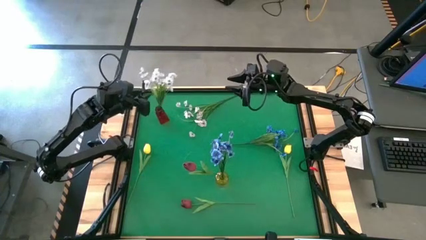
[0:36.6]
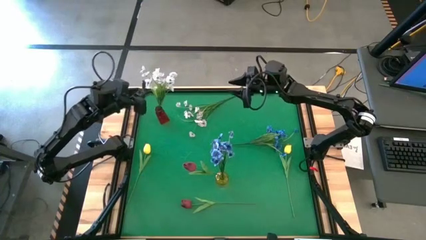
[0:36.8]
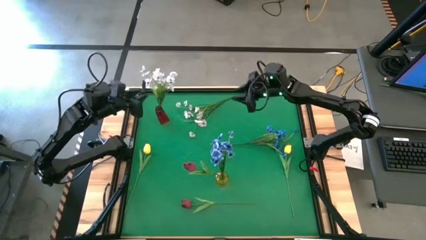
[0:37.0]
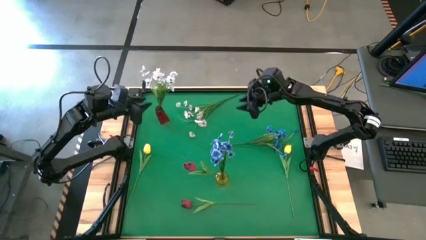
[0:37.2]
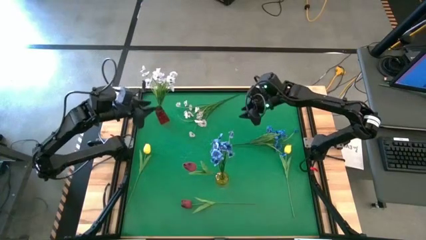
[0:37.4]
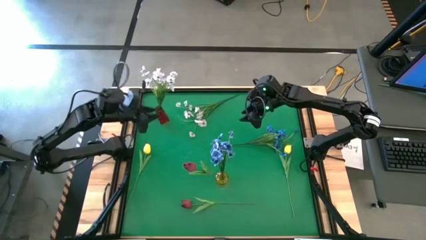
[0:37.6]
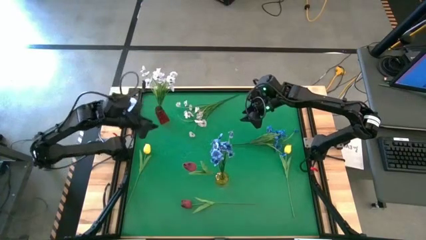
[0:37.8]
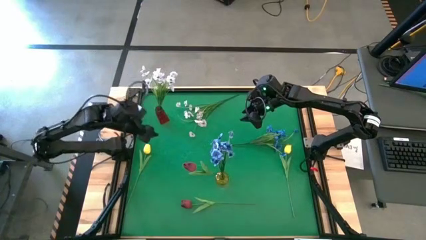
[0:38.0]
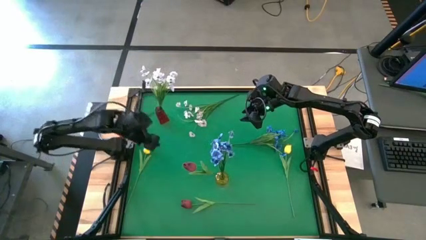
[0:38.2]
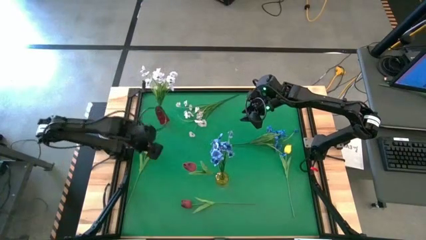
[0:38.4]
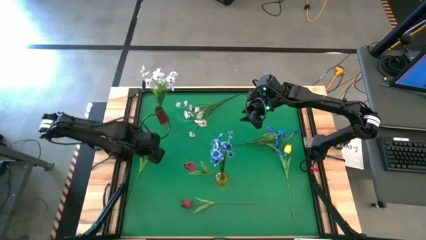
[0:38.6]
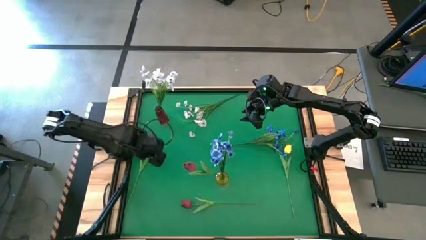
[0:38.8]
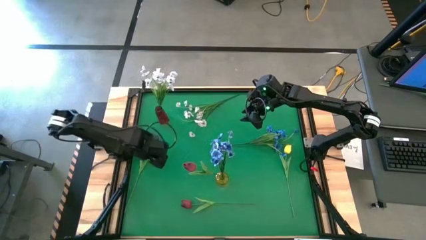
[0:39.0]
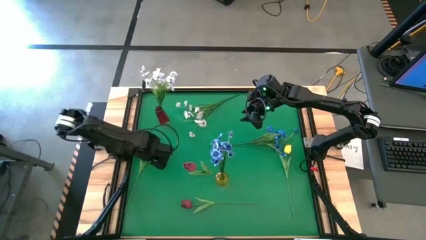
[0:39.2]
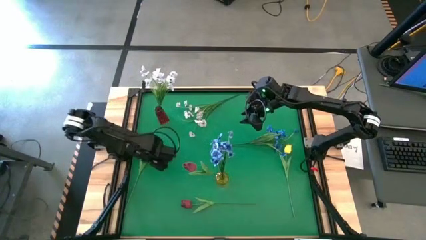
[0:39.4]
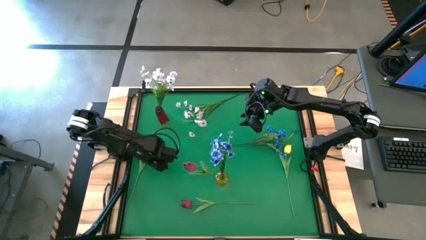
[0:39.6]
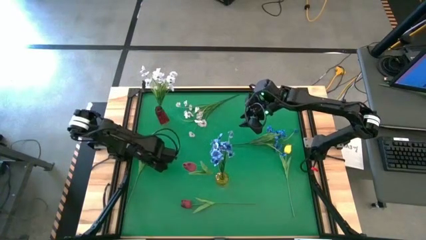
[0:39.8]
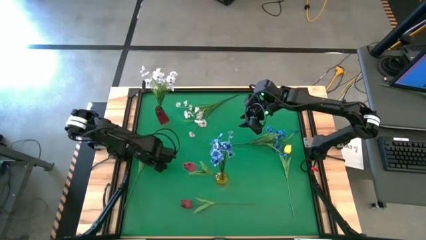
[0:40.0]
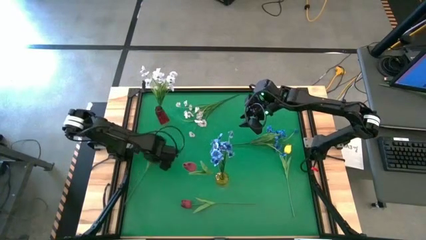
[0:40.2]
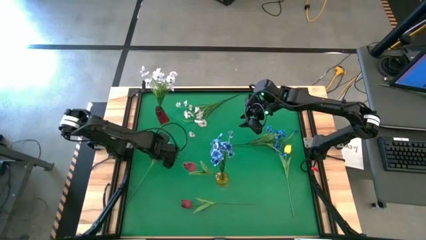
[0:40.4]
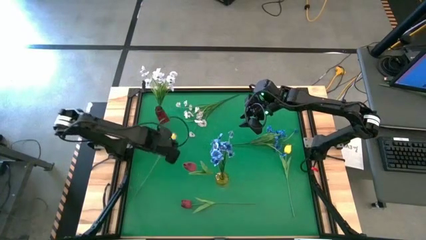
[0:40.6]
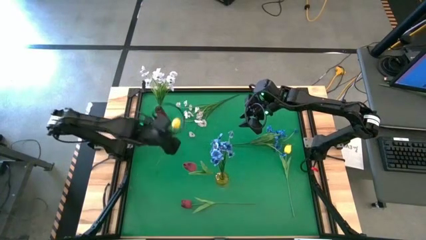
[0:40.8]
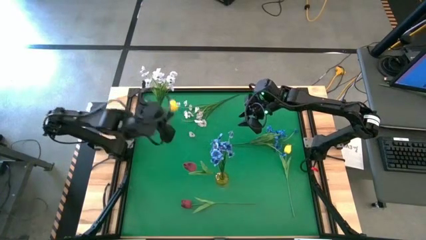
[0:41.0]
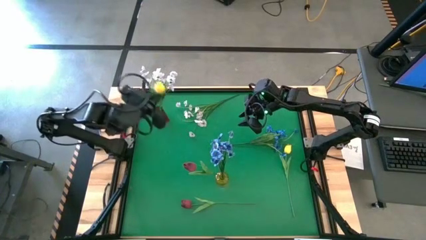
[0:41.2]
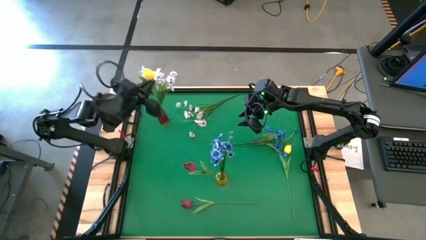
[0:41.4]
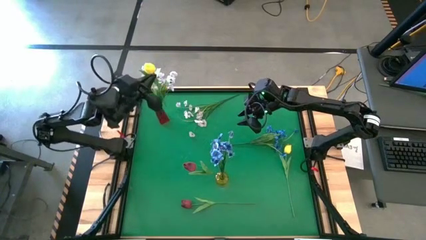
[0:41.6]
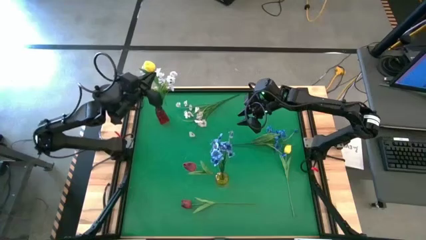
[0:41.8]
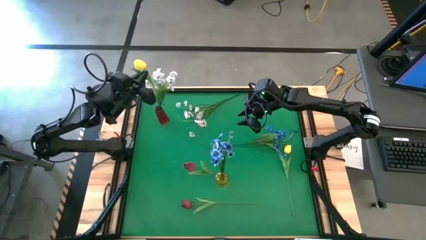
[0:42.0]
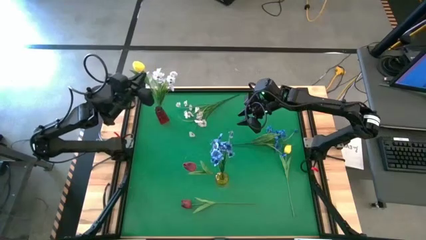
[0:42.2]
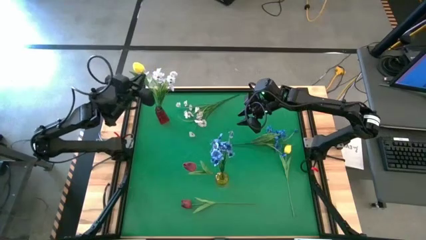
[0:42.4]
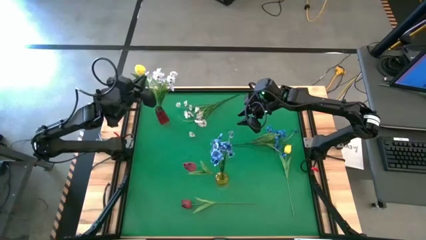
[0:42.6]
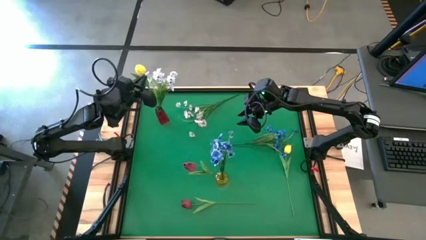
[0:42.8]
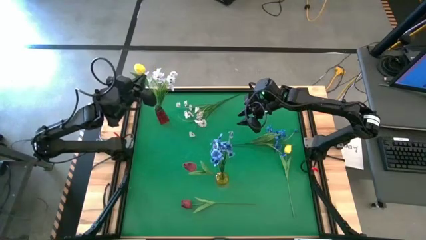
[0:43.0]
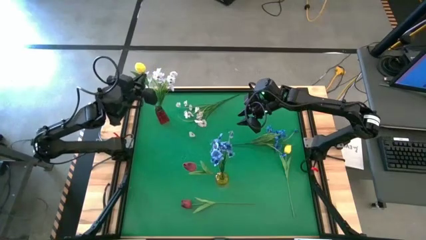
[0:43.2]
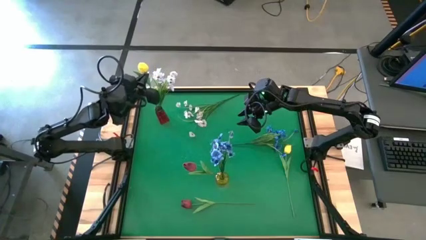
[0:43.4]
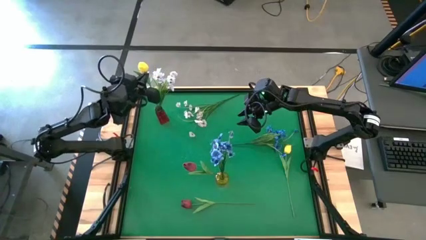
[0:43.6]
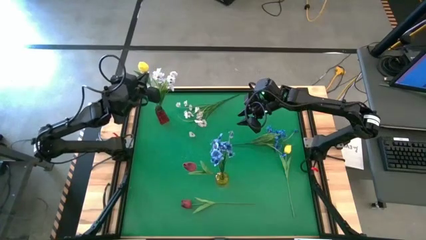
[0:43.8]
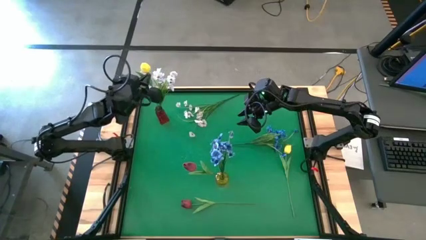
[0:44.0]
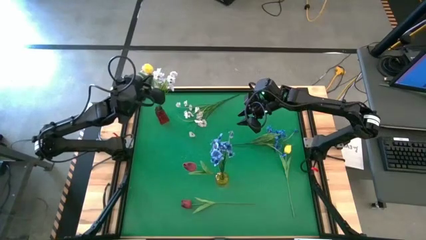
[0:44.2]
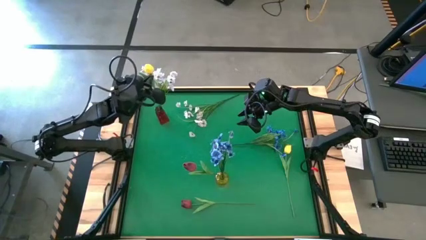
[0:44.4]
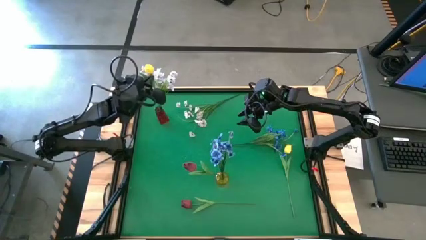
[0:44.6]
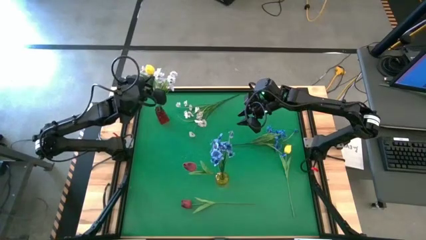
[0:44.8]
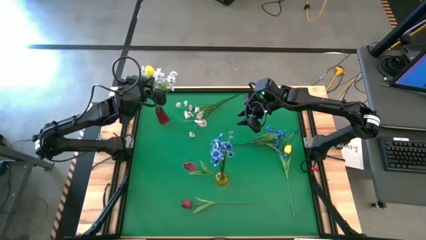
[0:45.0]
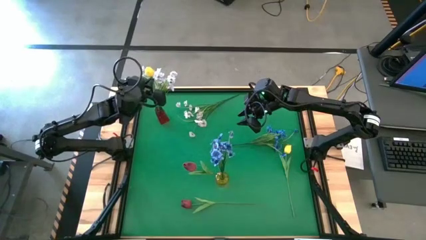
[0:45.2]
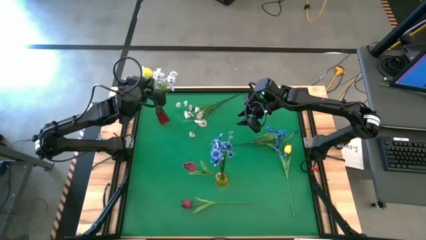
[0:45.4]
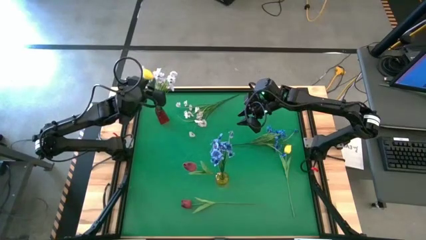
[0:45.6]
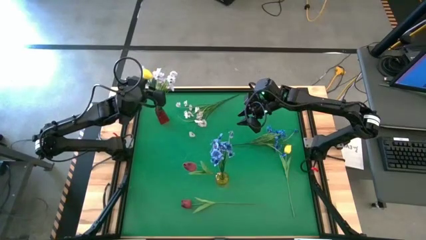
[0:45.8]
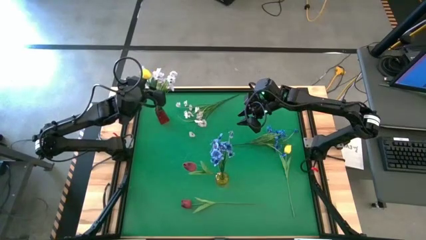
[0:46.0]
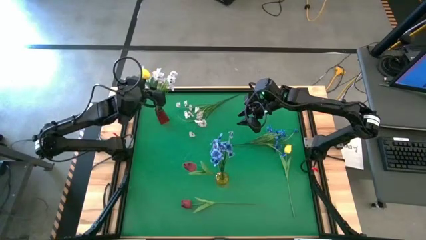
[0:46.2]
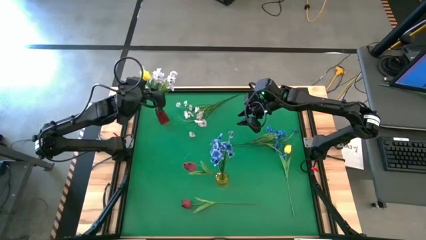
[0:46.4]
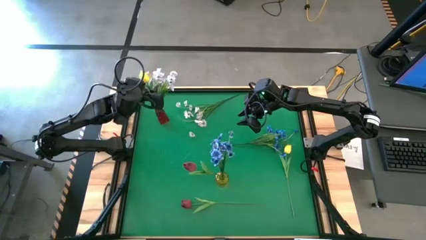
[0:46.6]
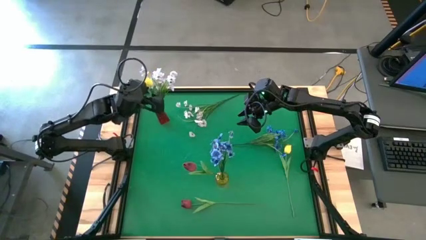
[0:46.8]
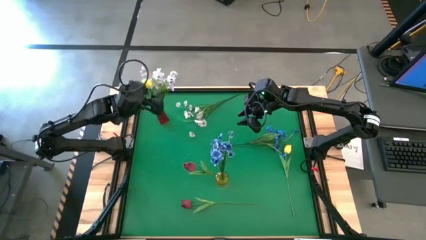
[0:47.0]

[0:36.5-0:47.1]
Task: Sort flowers into vase by color
Put the left yellow flower into the red vase
